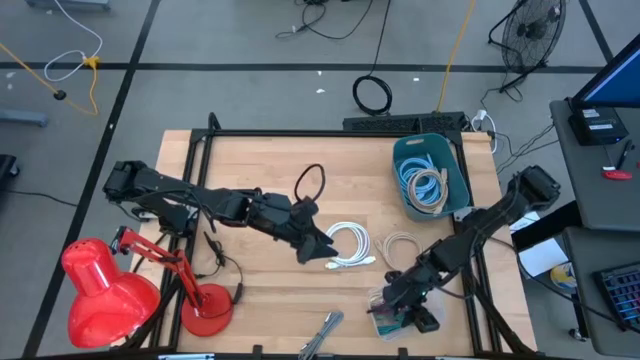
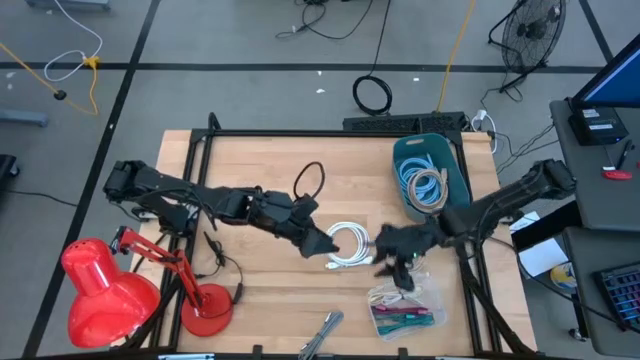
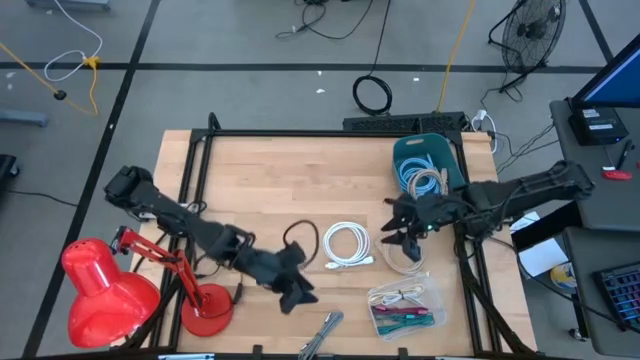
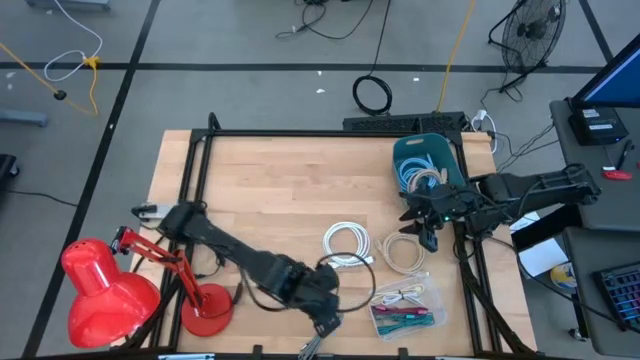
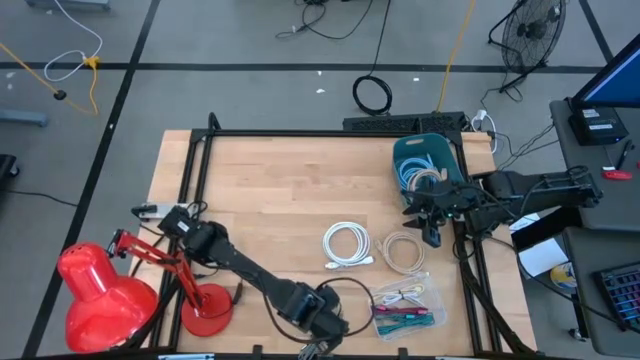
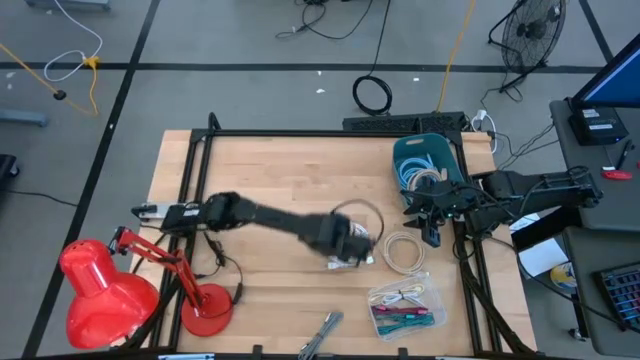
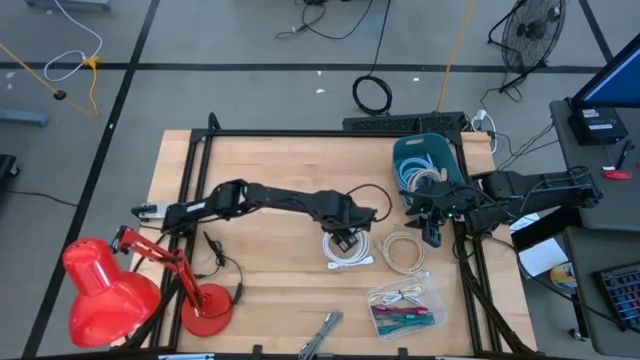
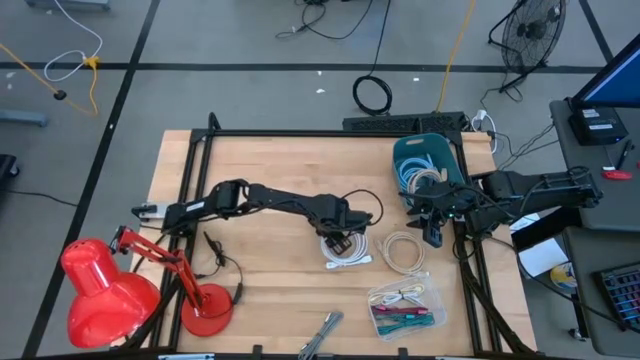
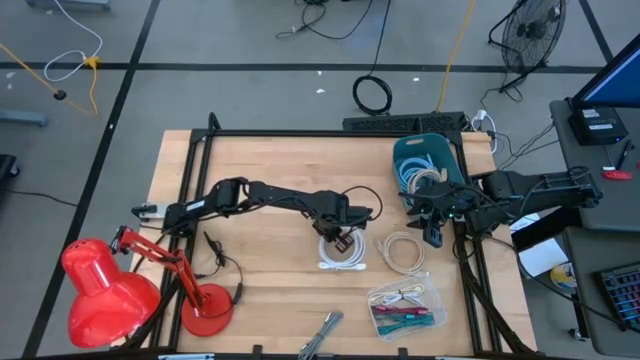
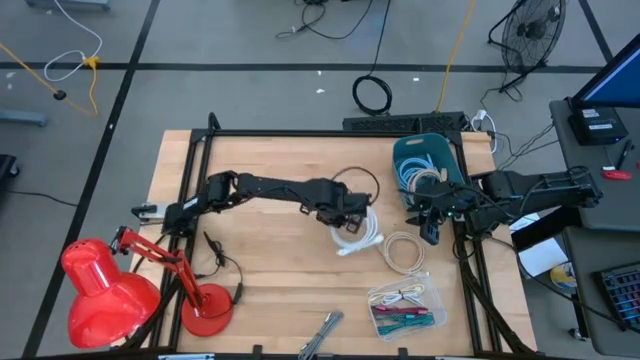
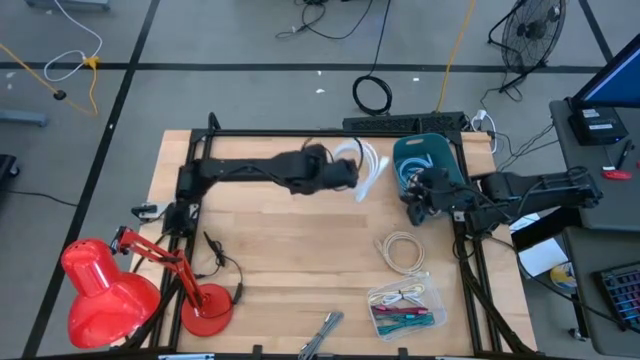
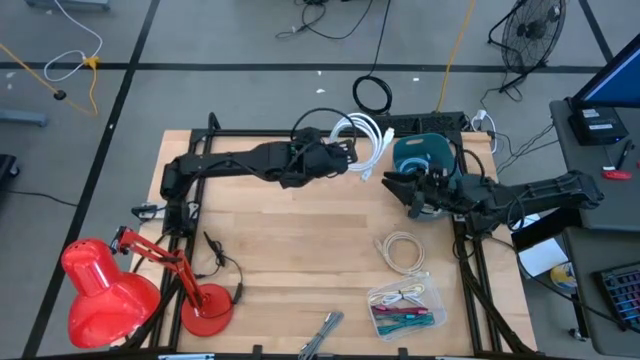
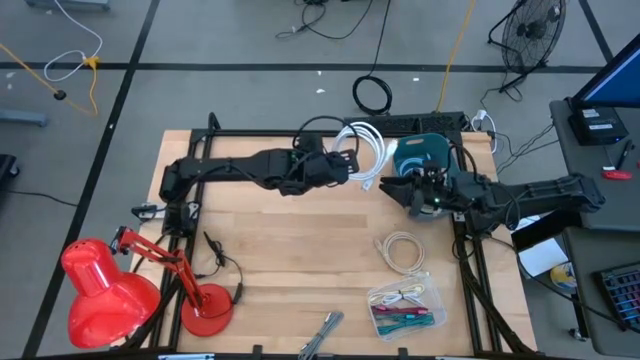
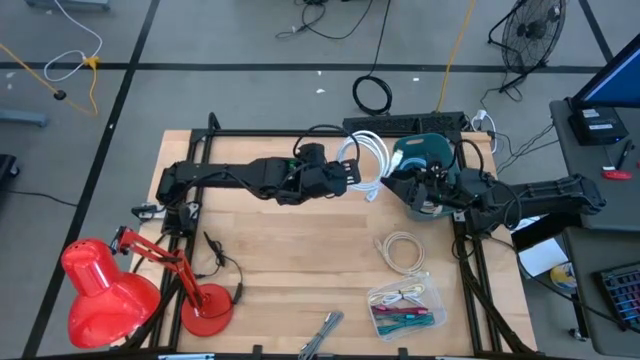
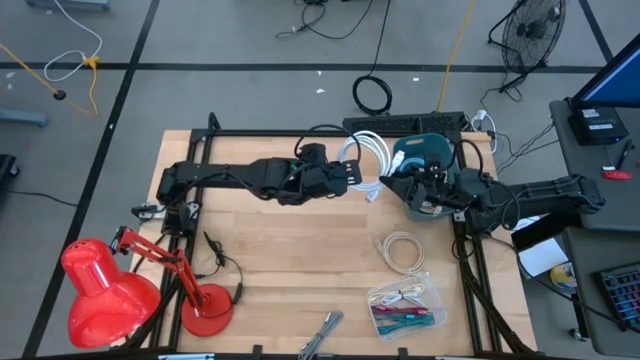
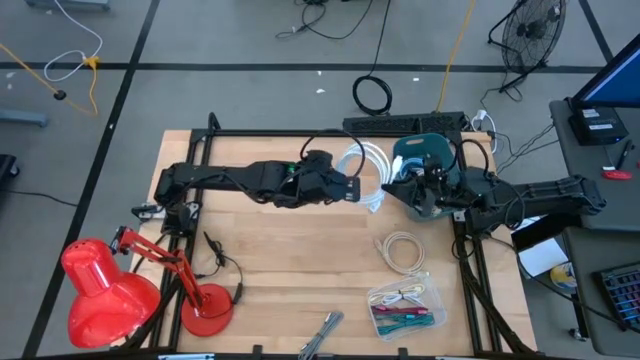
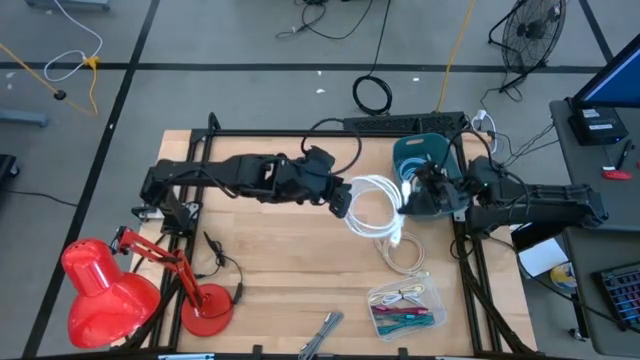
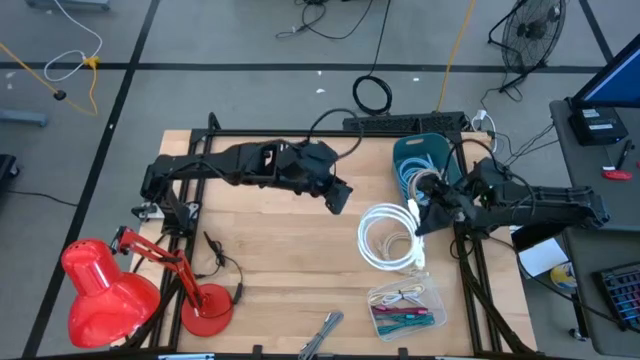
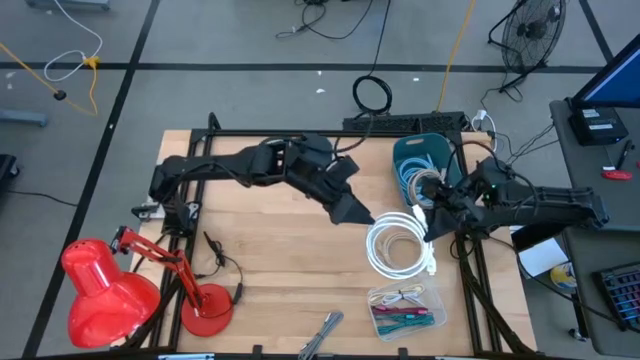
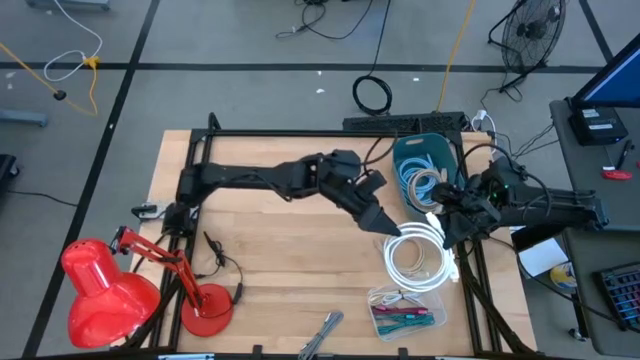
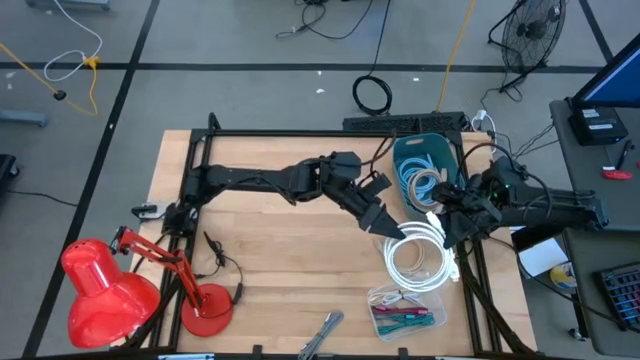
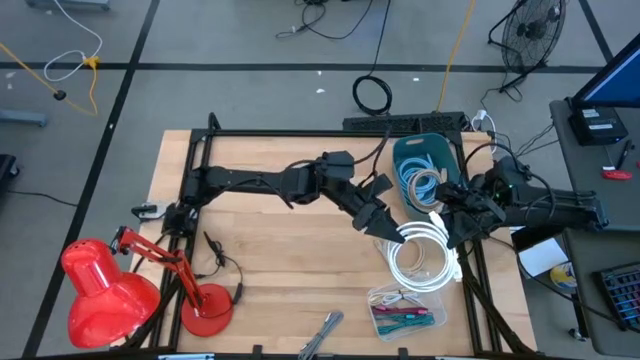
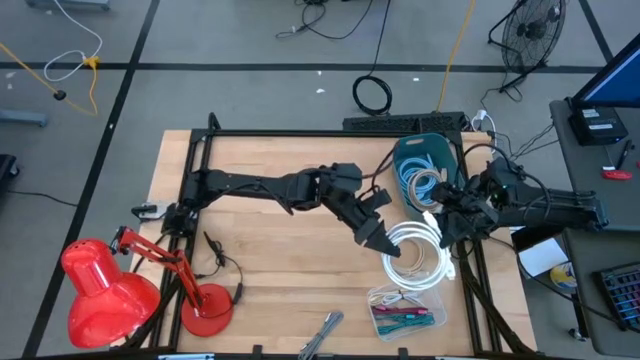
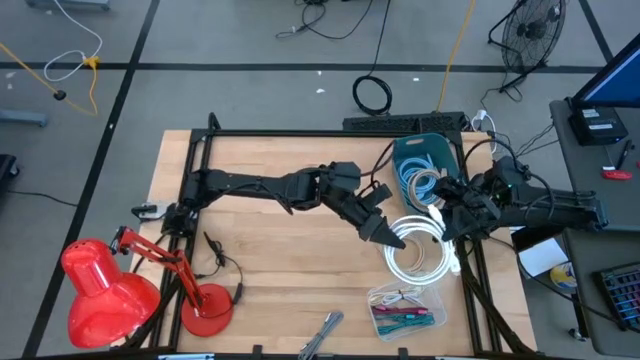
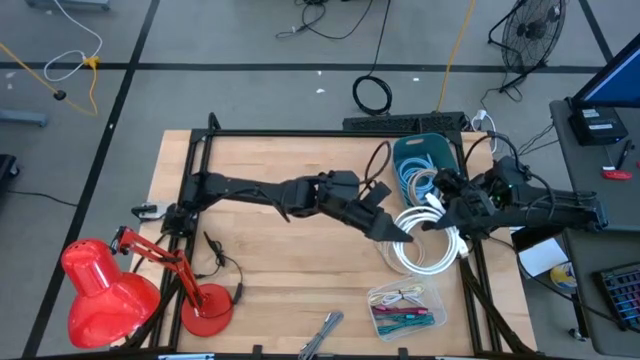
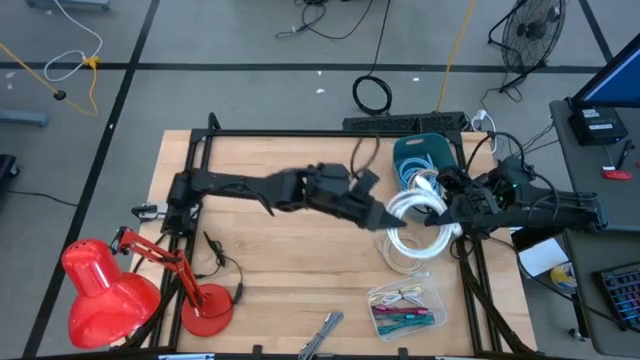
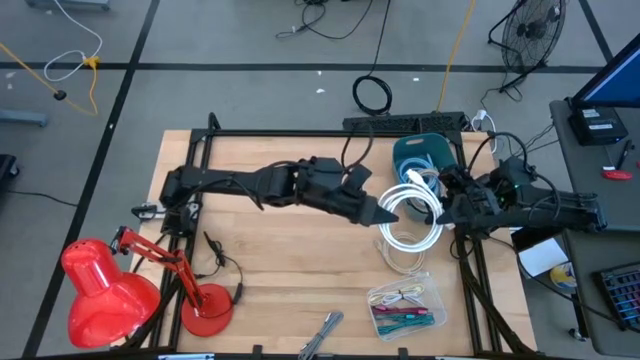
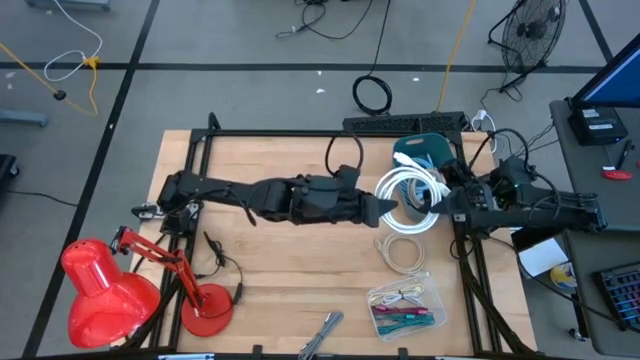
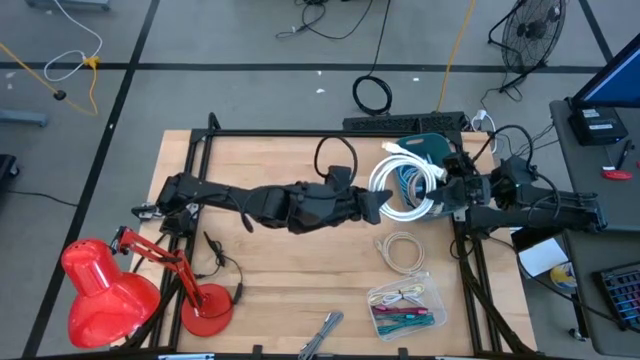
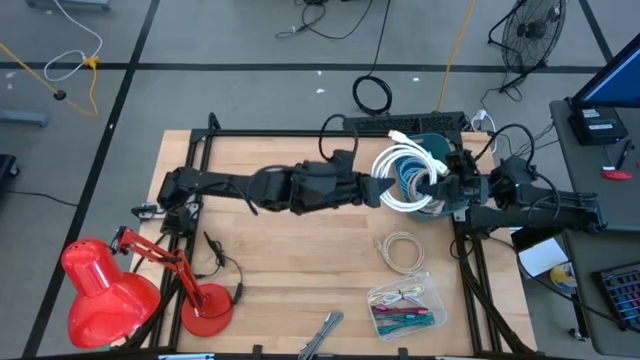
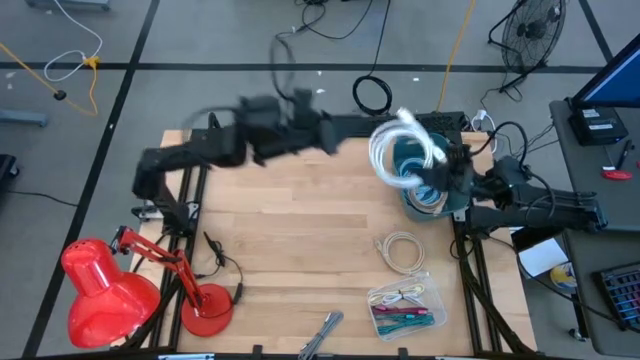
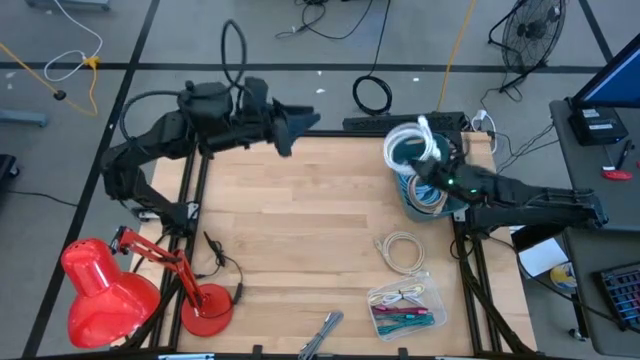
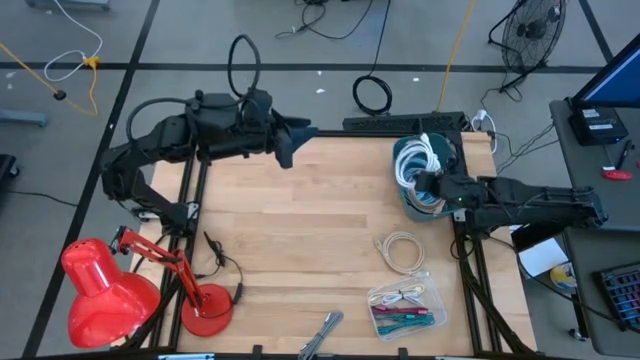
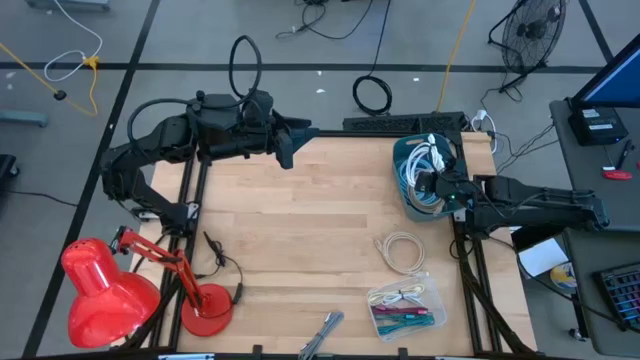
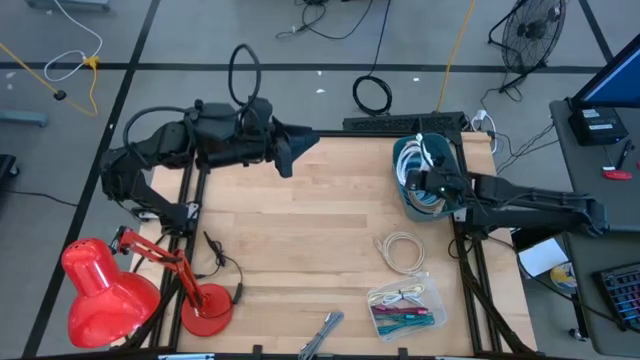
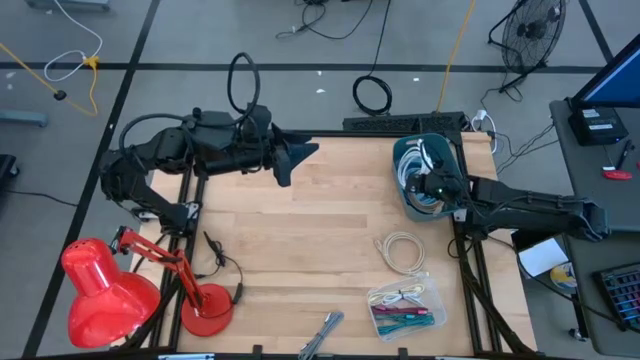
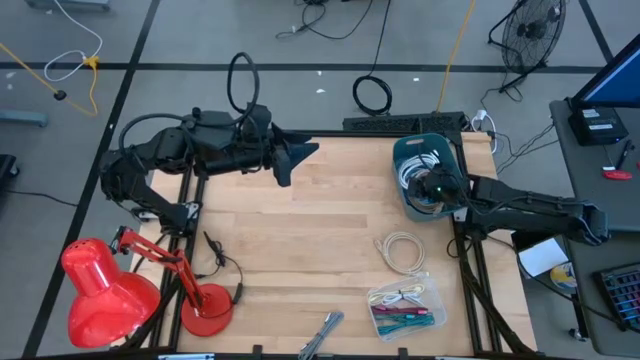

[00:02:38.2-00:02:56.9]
Task: Pick & Place USB Port
Put the white hdmi cable into the blue bin

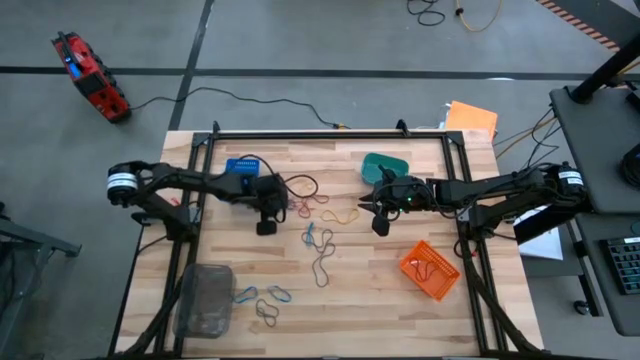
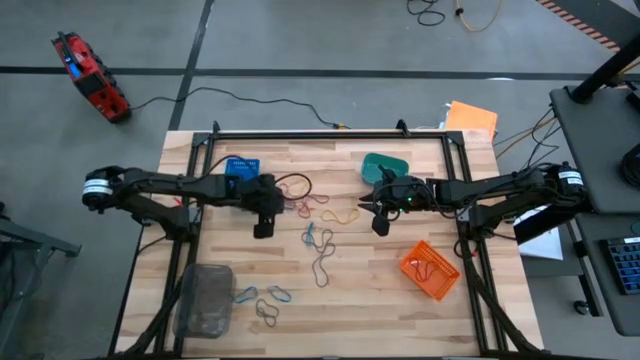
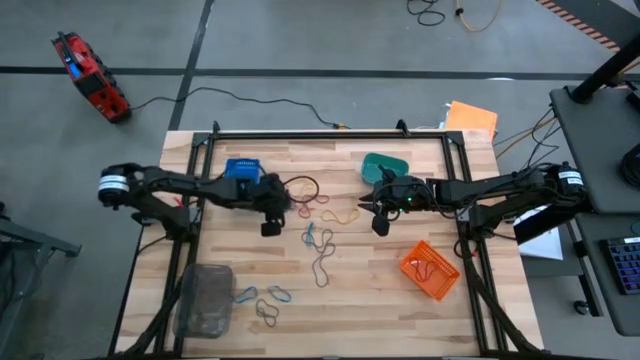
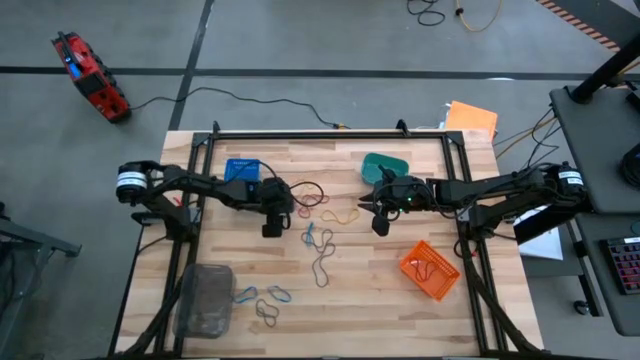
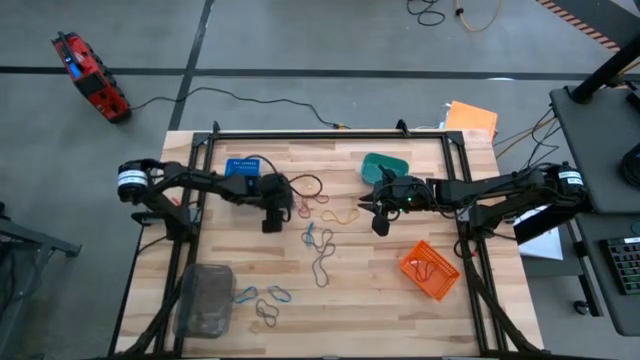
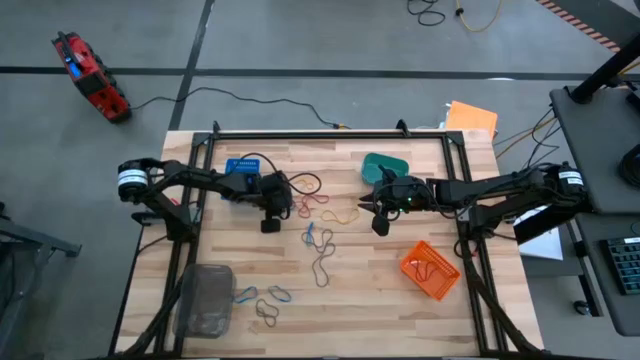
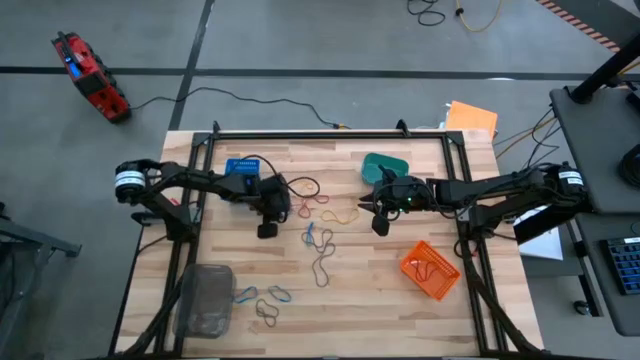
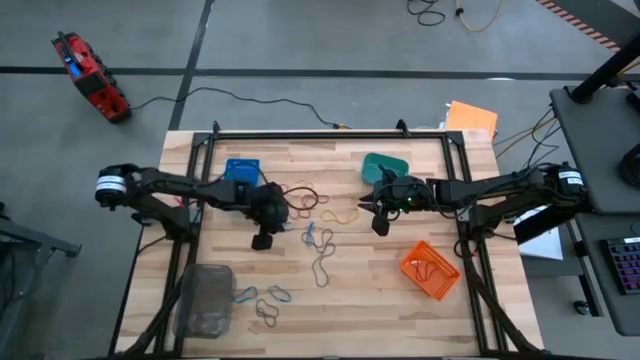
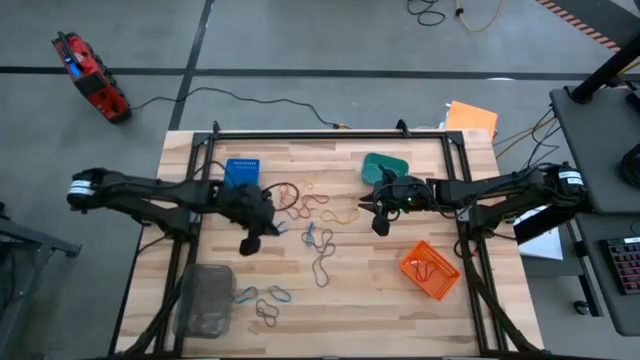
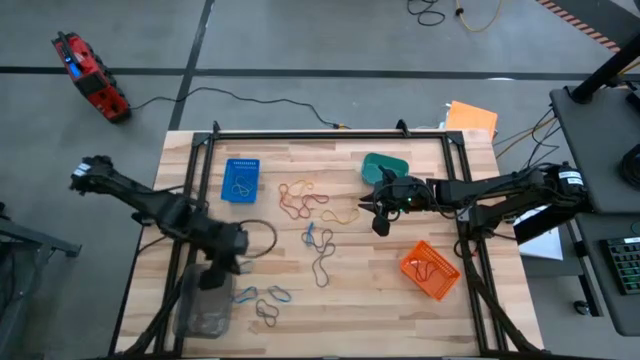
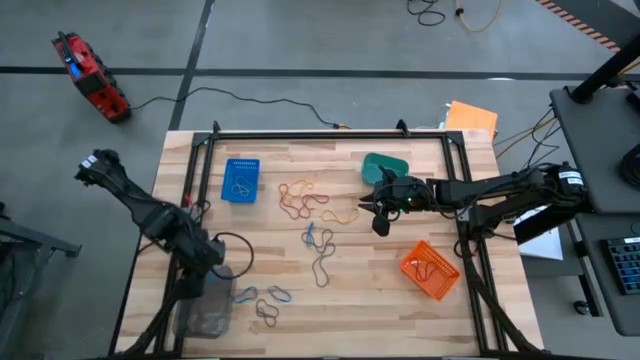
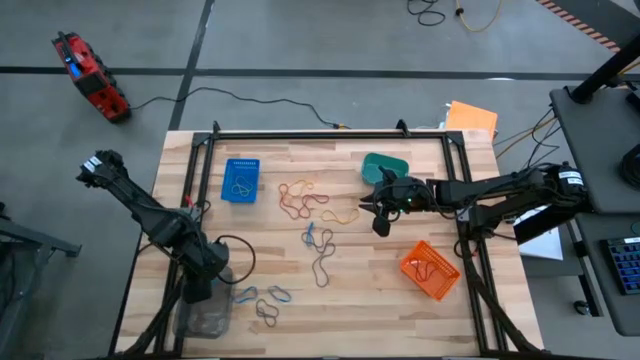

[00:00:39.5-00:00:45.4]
Task: Sort rubber bands into baskets
Put the blue rubberband into the black bin
